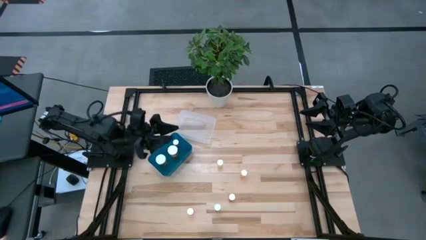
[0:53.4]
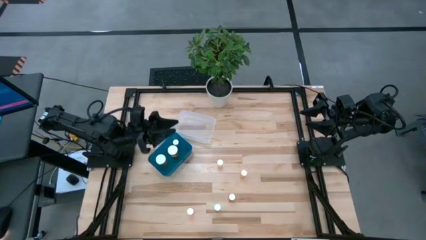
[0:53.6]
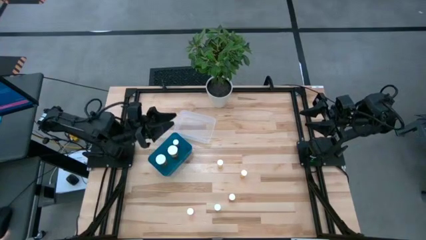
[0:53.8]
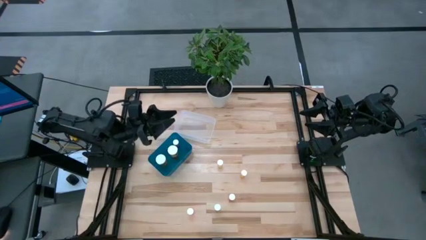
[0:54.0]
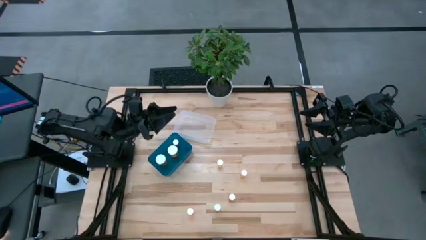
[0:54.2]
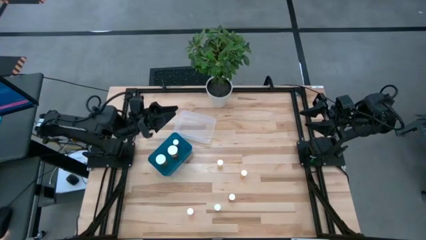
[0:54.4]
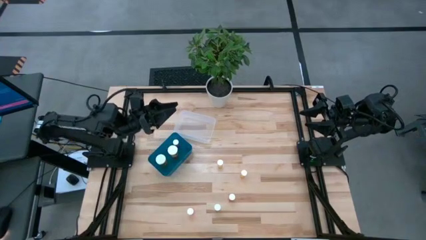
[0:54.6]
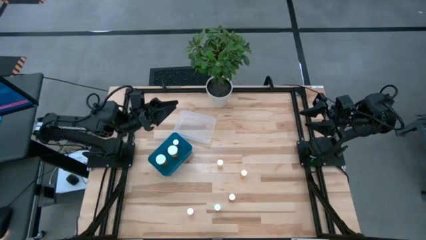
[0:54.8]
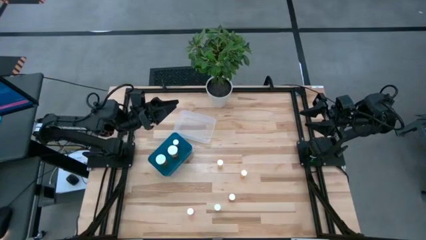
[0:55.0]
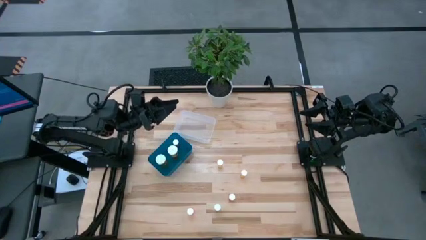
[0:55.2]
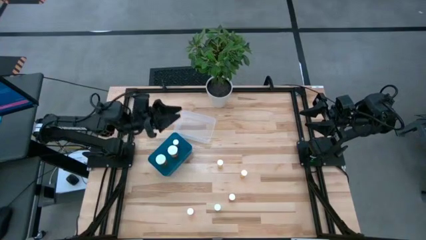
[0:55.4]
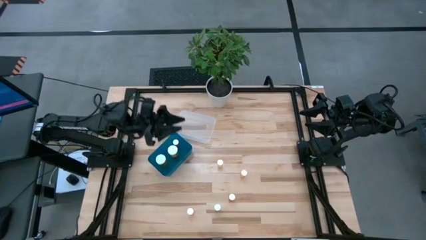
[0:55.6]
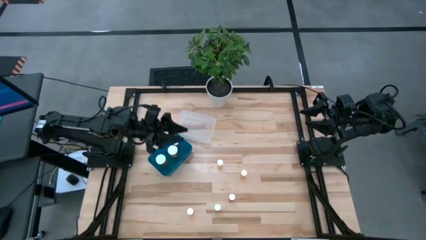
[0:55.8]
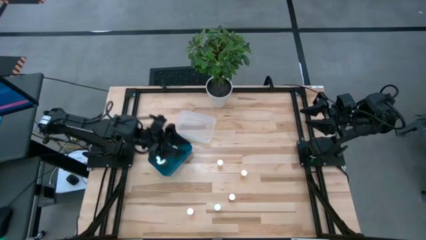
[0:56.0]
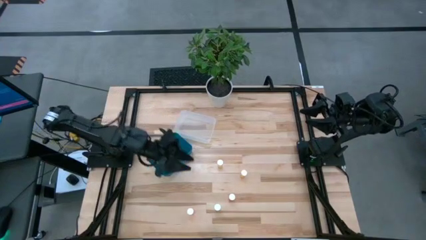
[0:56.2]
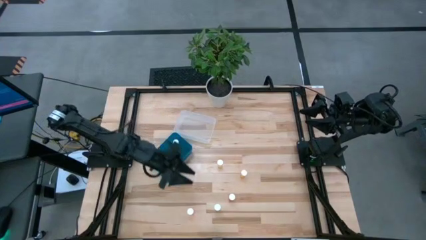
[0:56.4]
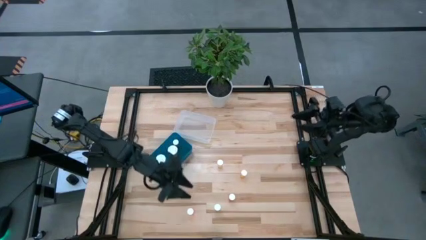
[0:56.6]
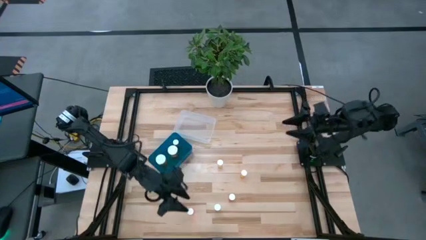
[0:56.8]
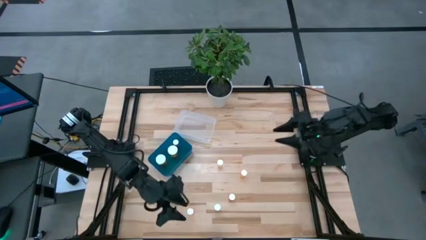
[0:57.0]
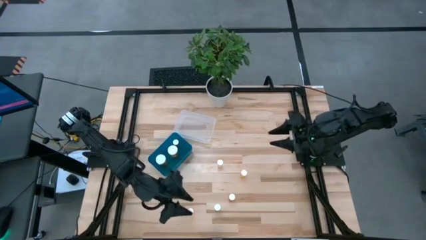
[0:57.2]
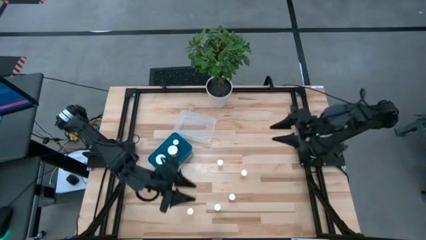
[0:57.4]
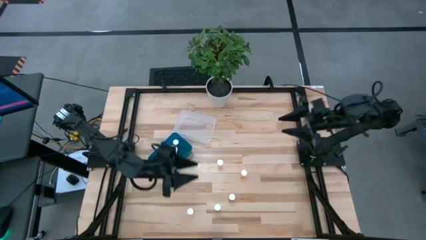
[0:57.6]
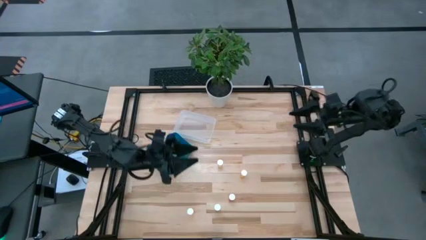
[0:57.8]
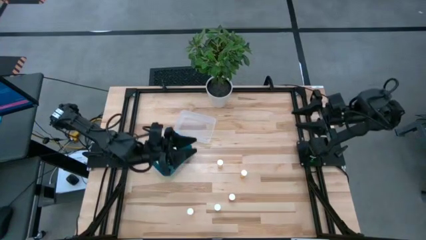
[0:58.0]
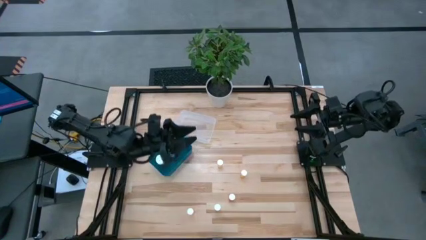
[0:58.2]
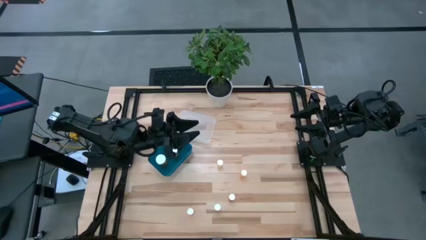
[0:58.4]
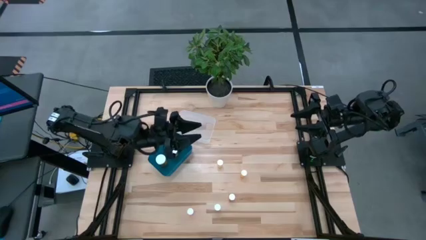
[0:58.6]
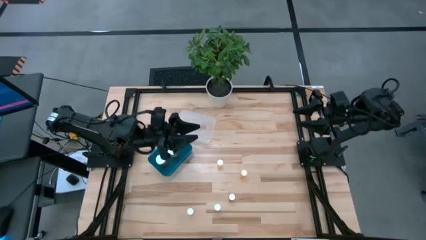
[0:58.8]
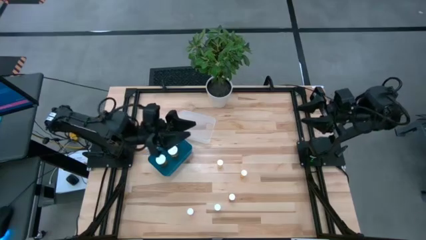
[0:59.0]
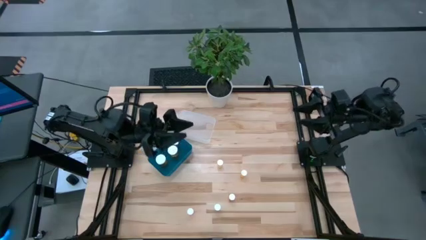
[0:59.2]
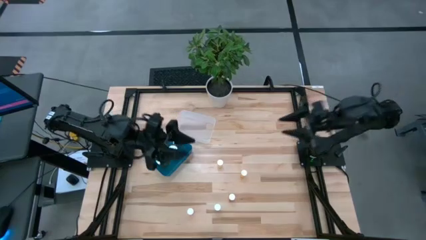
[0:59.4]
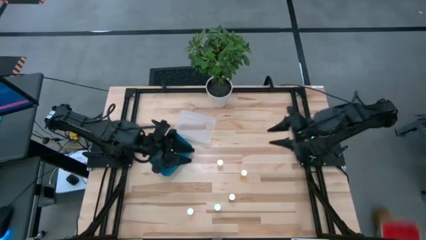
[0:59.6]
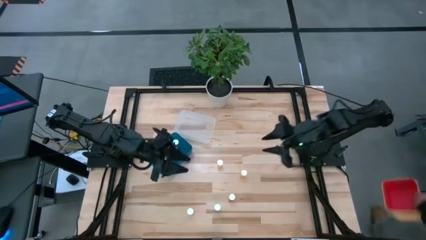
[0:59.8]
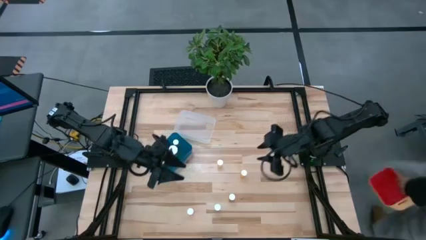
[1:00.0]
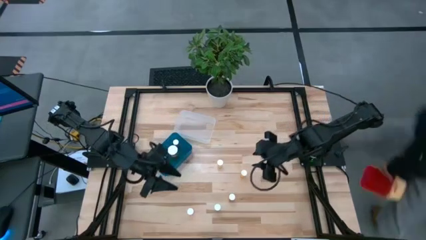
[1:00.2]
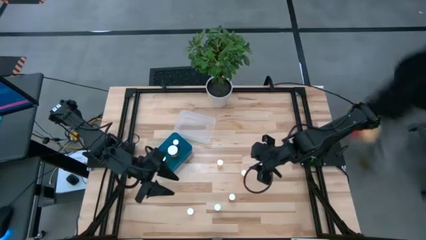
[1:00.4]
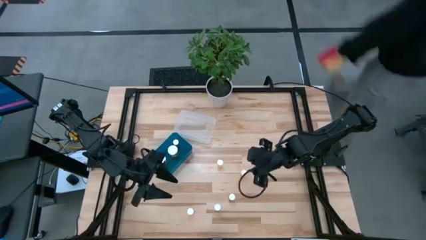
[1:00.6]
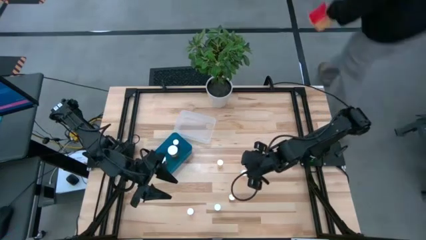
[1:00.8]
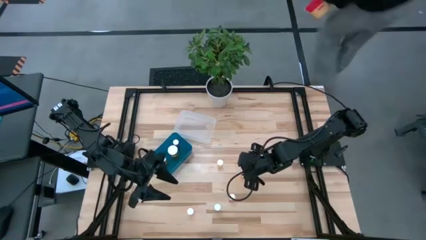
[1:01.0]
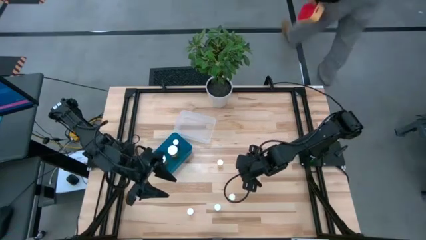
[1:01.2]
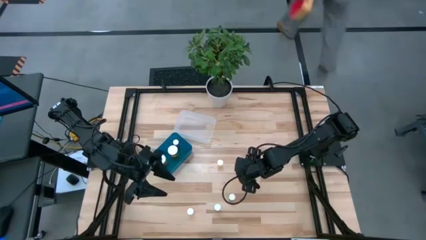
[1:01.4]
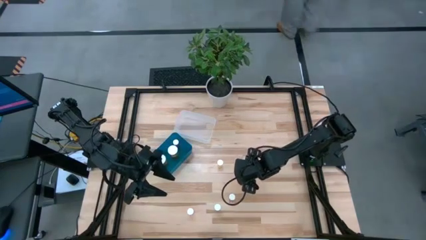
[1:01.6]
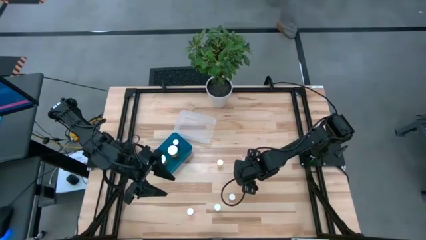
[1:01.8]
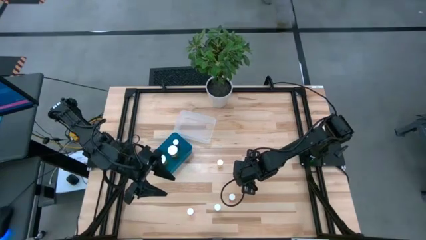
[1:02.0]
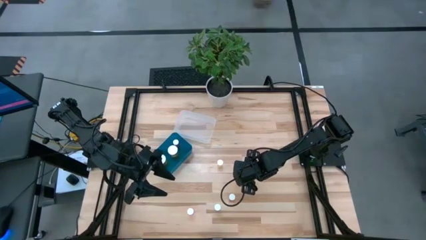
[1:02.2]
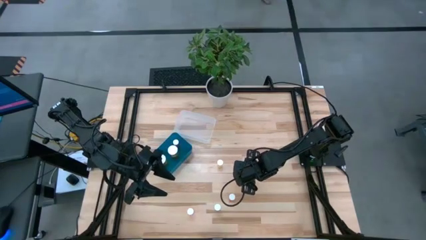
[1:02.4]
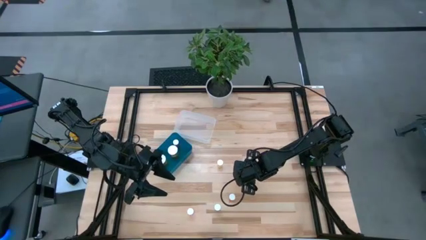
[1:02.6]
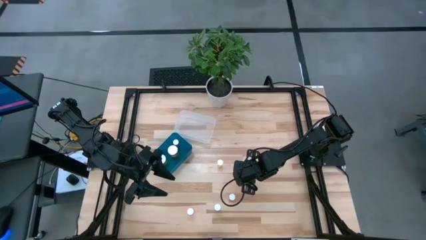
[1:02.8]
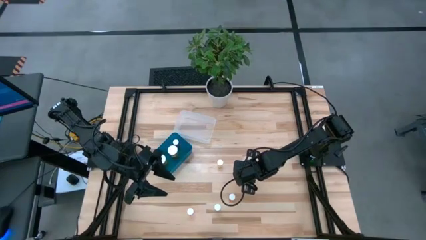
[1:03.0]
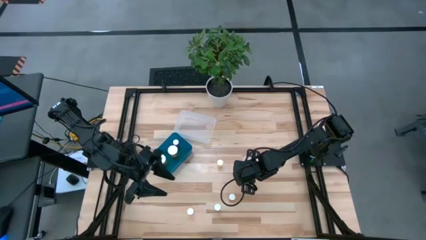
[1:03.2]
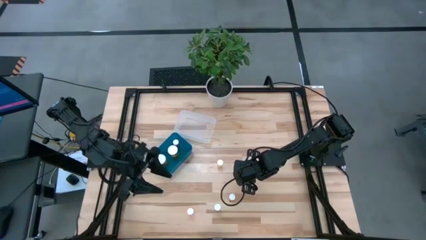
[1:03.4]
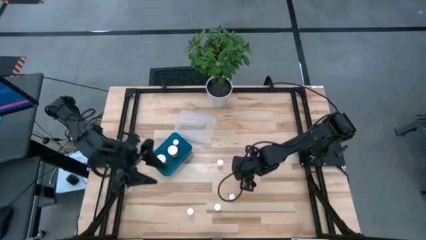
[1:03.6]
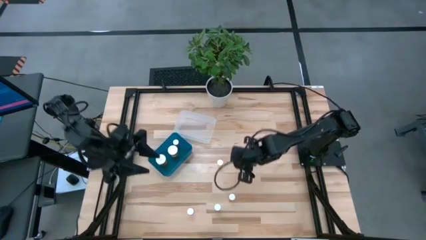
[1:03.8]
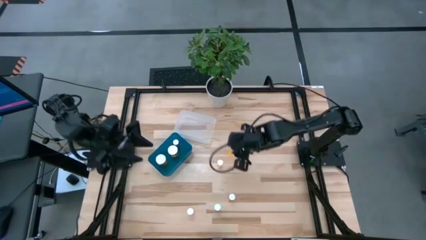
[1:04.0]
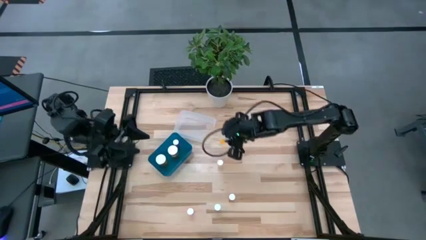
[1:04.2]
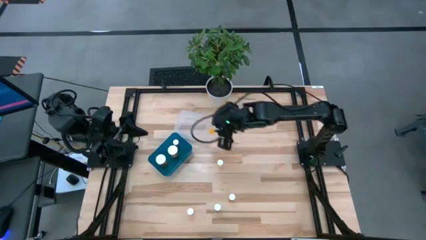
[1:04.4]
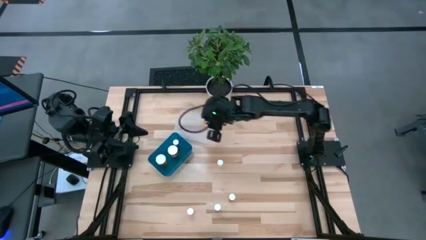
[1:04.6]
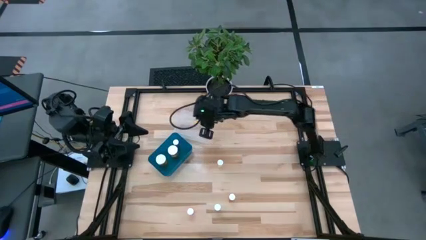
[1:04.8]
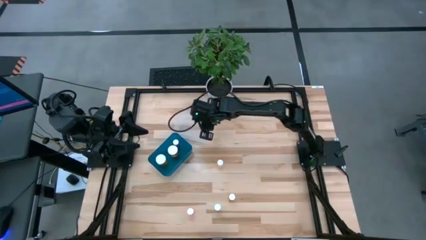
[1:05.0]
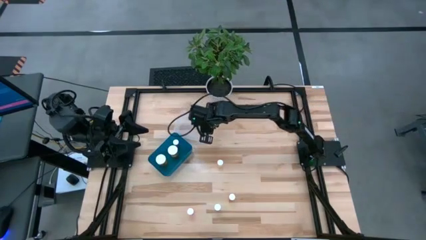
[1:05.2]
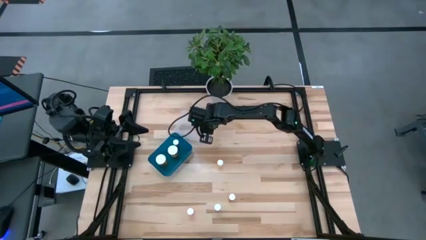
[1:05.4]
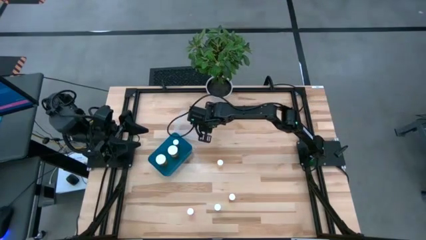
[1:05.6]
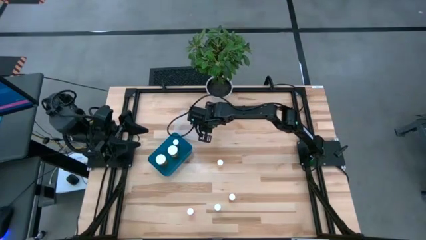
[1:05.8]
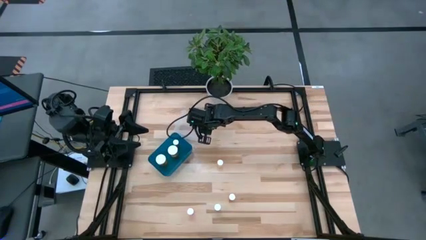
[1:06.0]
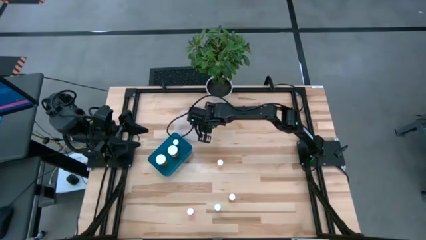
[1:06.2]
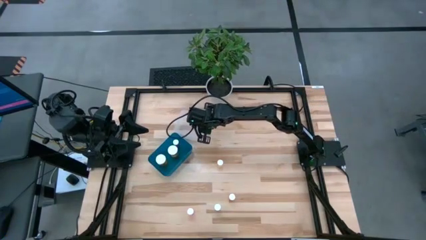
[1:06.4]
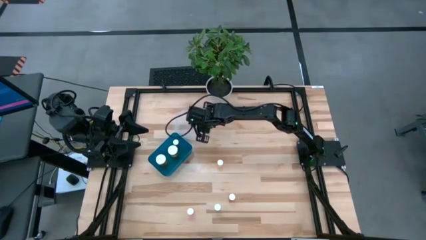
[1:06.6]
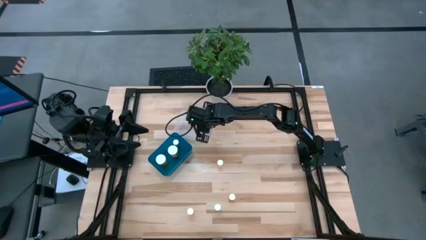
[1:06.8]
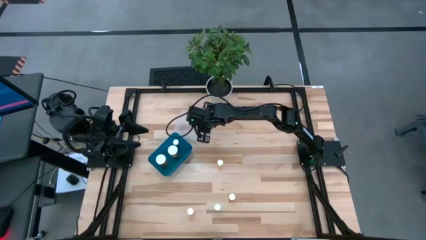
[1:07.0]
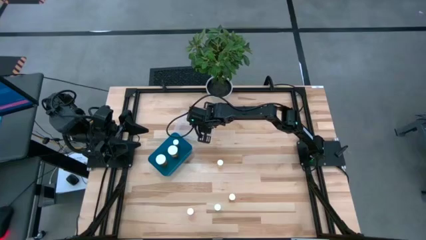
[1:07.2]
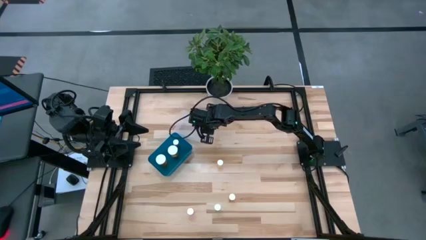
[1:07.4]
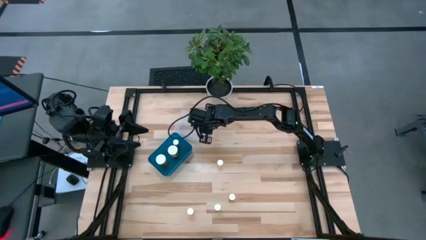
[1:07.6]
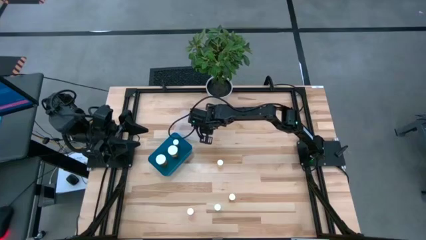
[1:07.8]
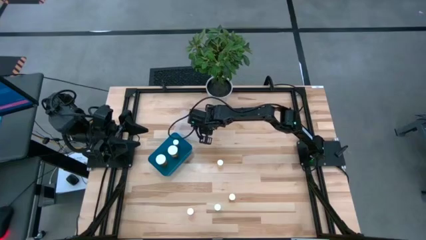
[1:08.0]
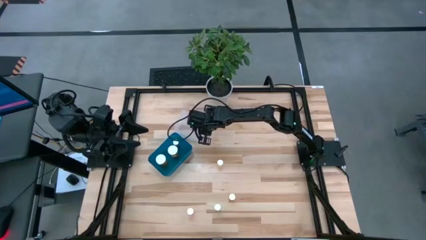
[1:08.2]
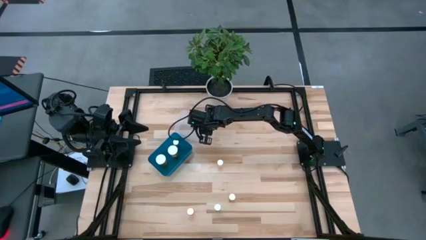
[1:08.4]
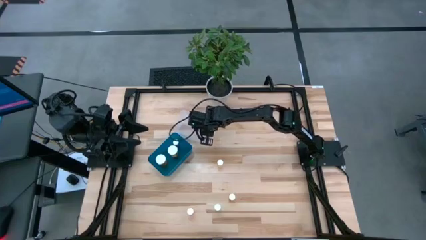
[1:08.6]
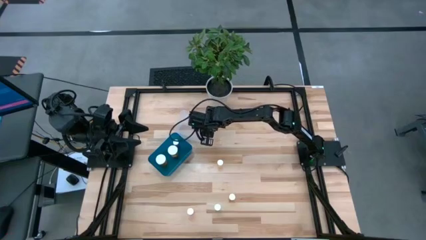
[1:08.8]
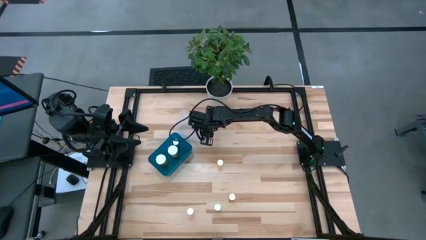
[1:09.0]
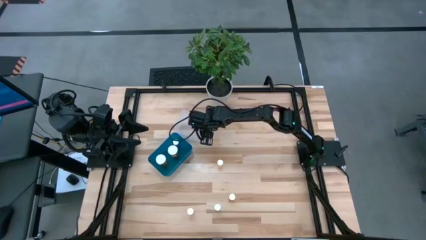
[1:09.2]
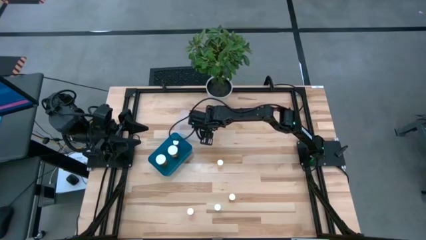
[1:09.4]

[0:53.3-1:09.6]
Task: Pick and place medicine bottles into bin by pill shape (circle, oval)
Put the orange pill bottle into the transparent bin
